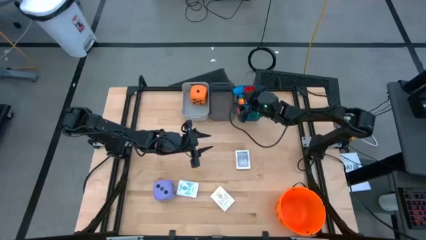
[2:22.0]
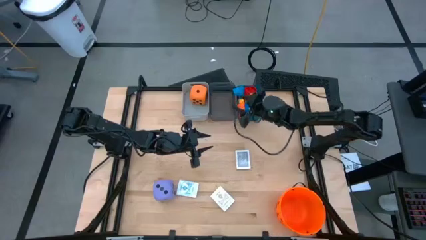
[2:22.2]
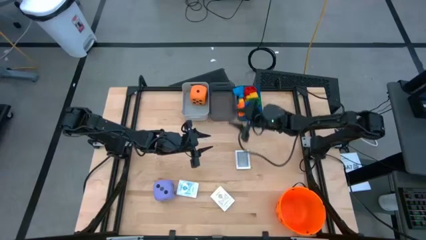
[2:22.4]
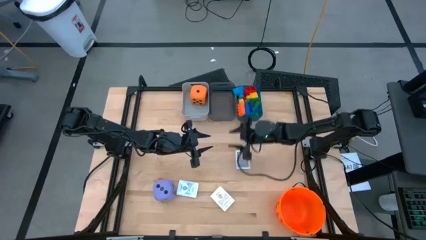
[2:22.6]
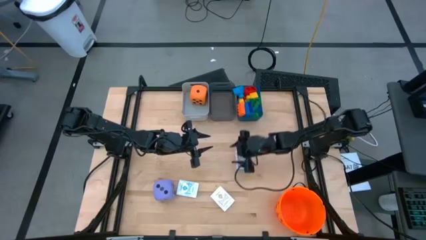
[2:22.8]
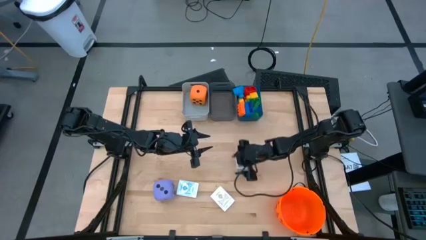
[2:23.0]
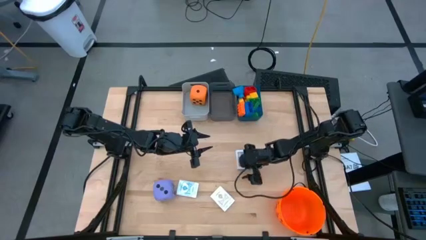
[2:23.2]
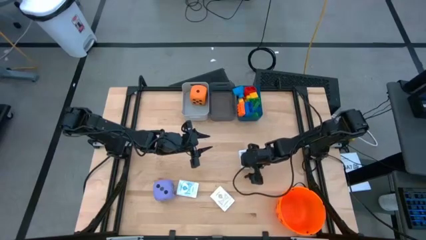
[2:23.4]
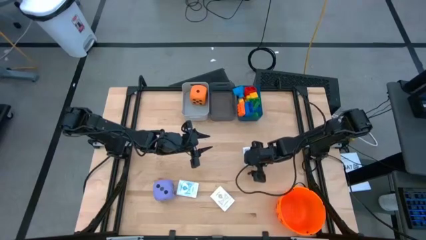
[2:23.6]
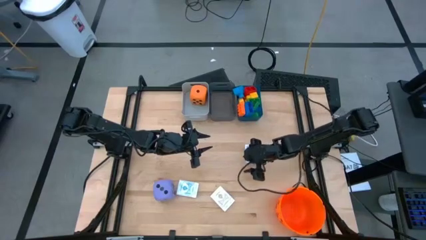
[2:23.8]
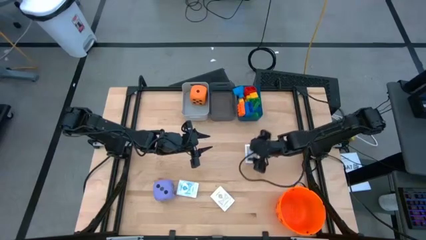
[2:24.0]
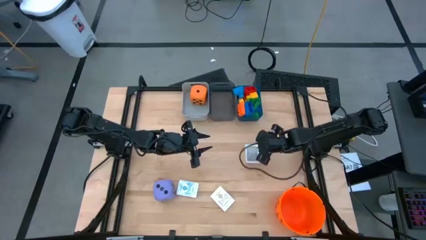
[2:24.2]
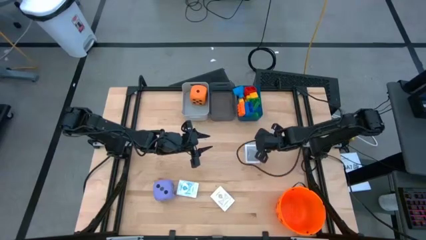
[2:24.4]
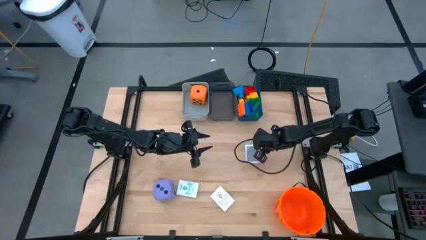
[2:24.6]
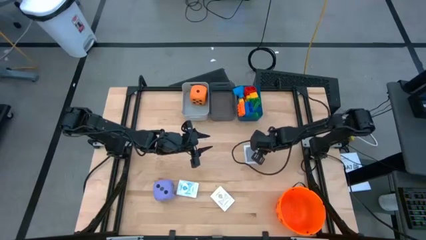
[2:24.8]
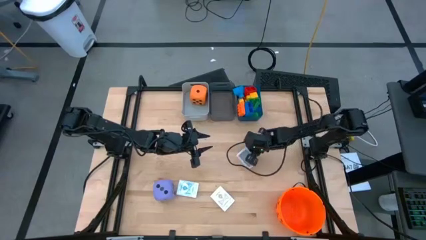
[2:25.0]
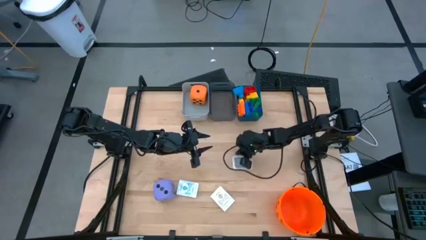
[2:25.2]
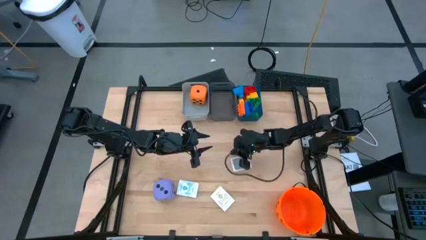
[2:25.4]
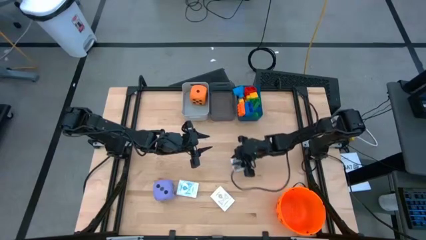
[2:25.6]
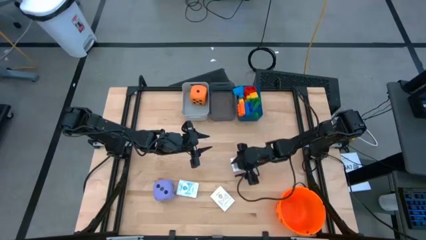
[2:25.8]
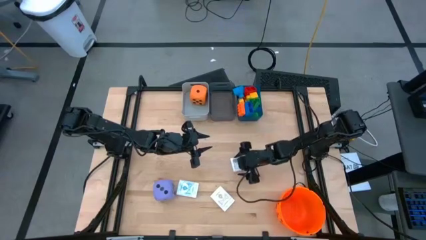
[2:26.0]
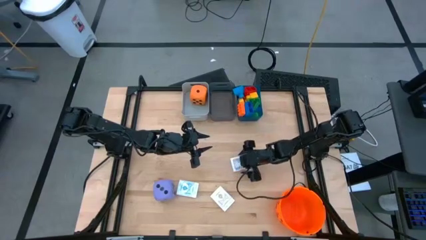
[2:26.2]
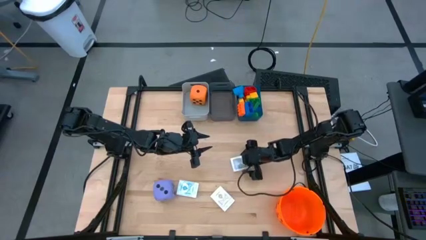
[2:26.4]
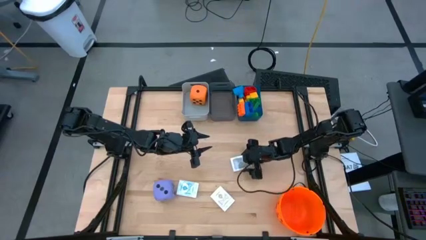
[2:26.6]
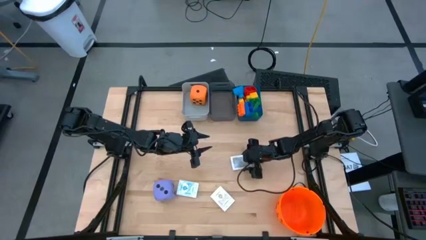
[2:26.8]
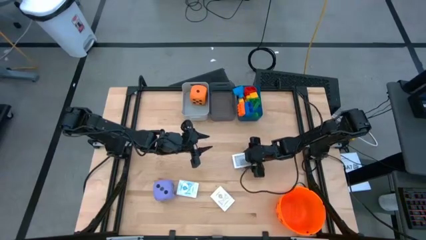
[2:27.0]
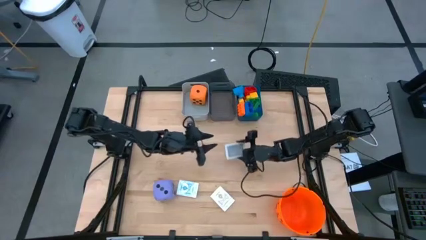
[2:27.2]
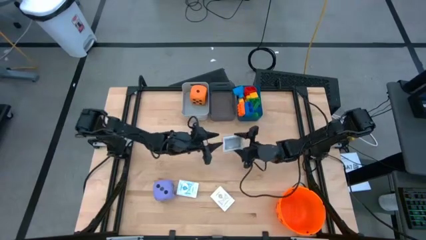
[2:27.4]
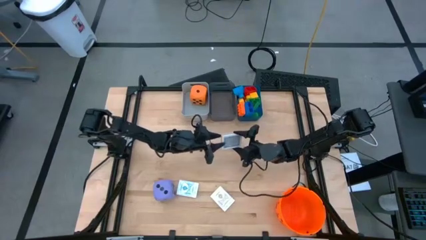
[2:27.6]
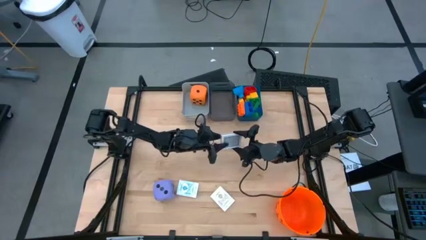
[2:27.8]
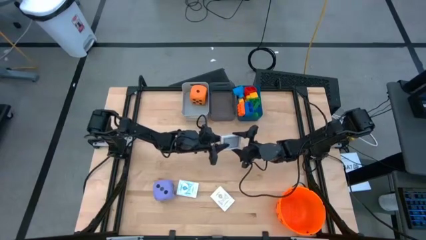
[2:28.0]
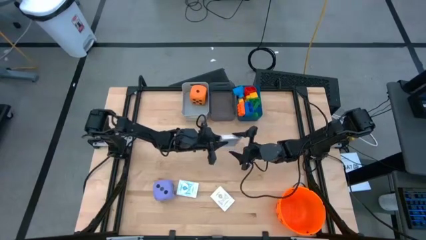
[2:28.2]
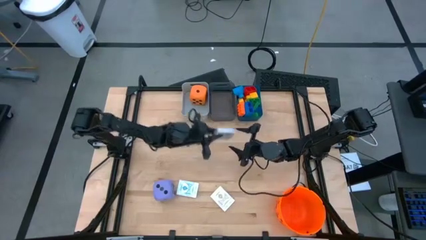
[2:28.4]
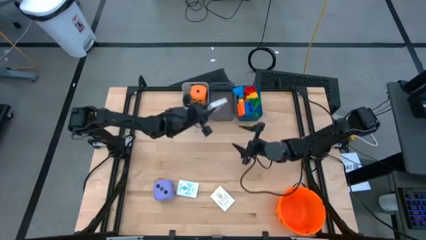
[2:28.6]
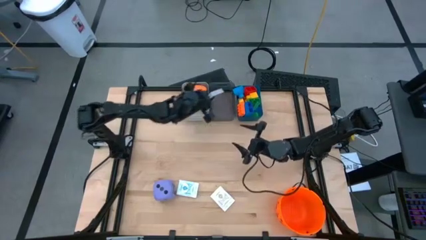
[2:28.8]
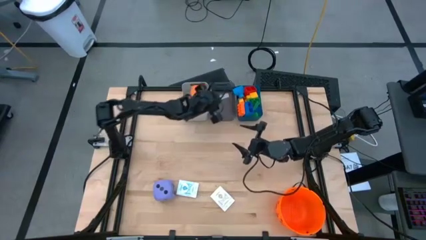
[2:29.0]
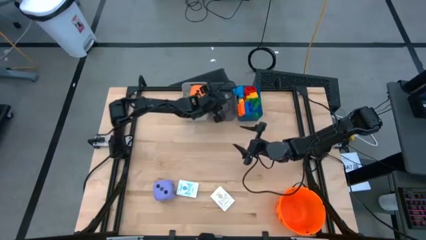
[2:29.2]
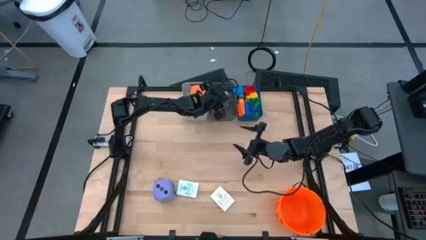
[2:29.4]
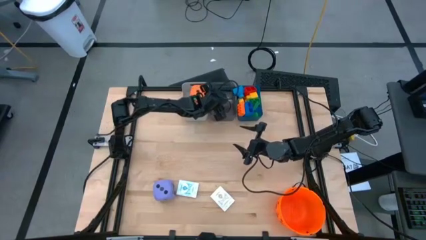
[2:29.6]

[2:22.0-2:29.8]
Task: Pick & Place Toys
Put the green playing cards into the black bin

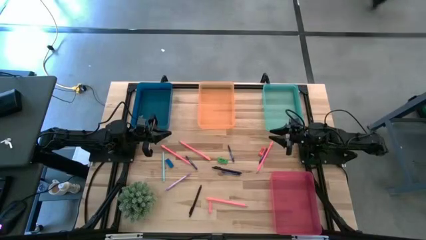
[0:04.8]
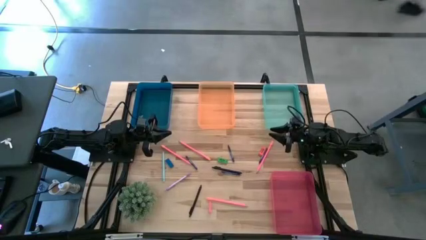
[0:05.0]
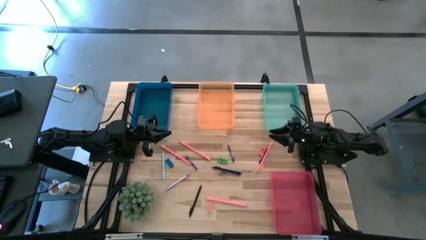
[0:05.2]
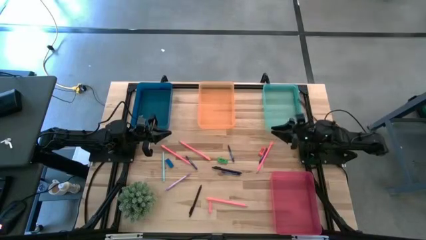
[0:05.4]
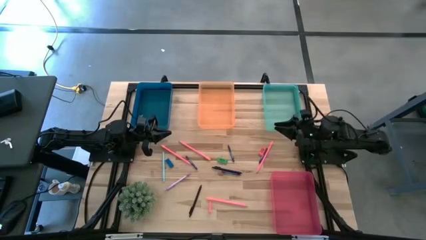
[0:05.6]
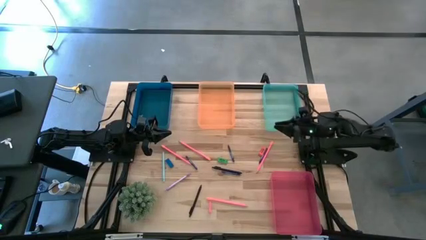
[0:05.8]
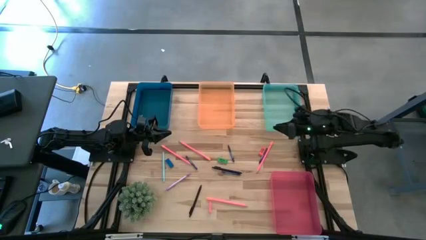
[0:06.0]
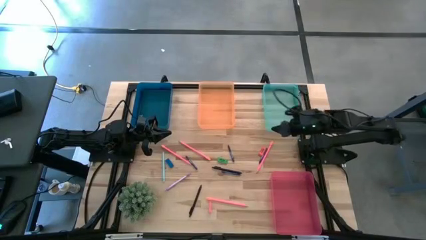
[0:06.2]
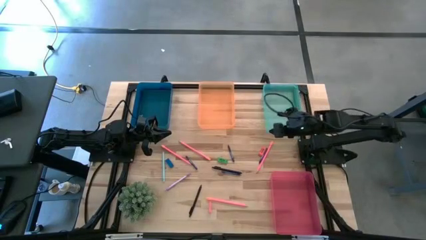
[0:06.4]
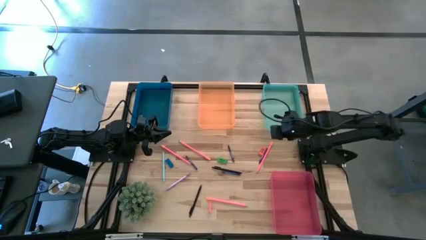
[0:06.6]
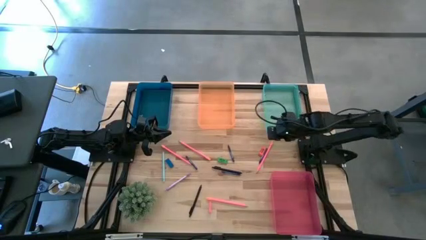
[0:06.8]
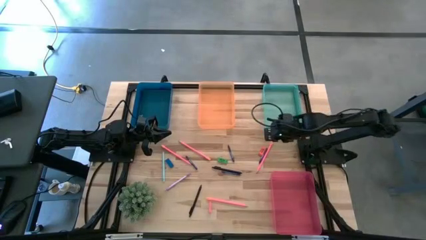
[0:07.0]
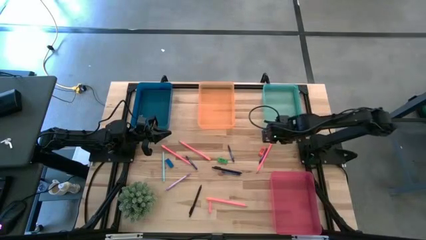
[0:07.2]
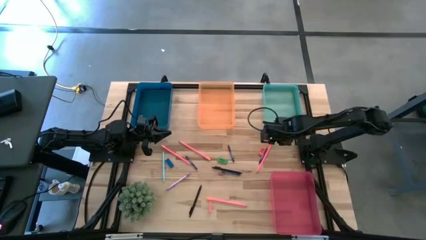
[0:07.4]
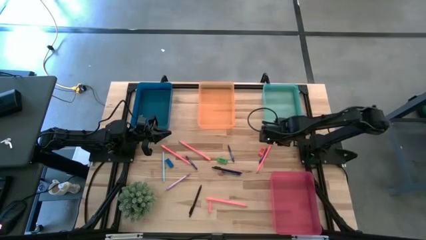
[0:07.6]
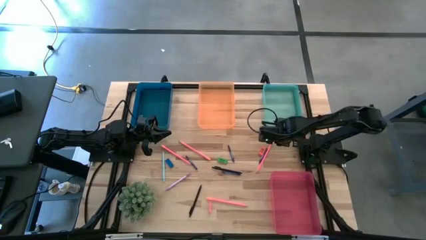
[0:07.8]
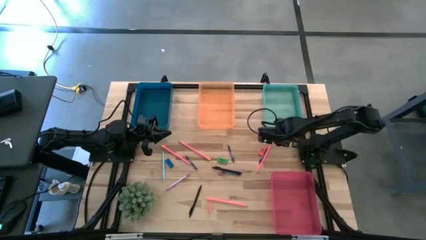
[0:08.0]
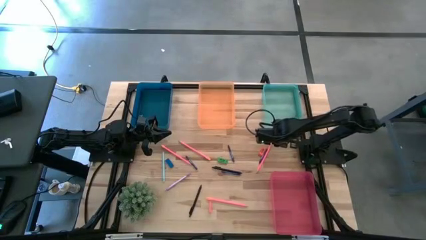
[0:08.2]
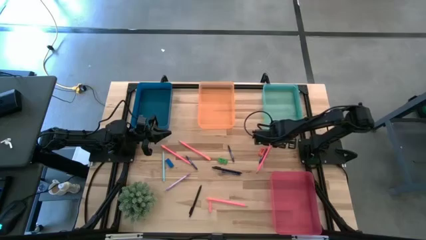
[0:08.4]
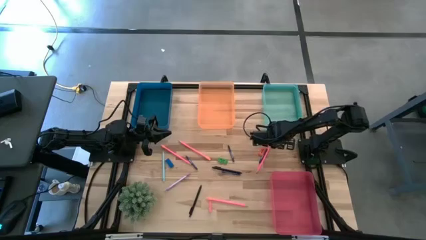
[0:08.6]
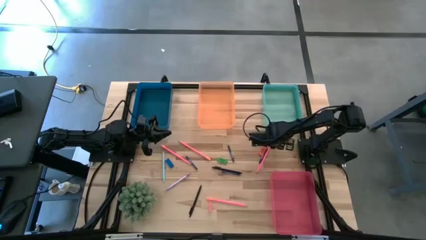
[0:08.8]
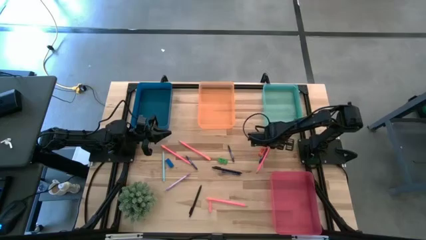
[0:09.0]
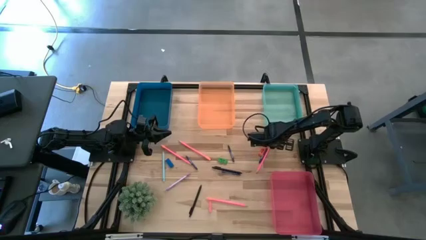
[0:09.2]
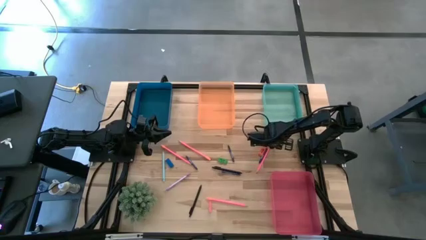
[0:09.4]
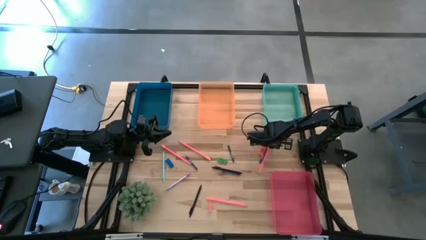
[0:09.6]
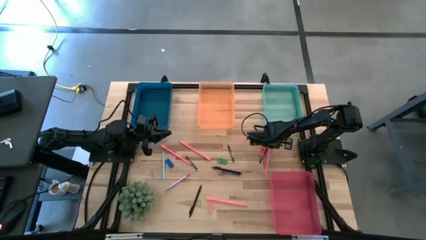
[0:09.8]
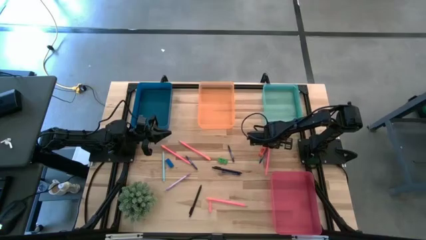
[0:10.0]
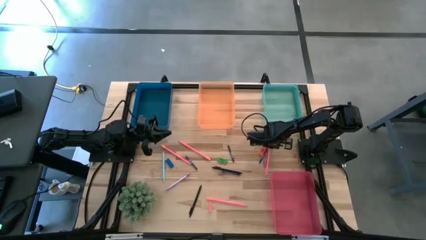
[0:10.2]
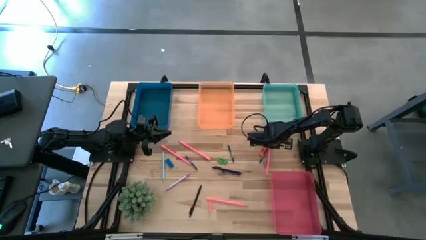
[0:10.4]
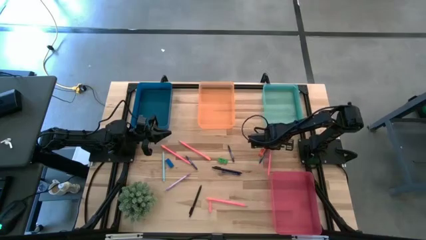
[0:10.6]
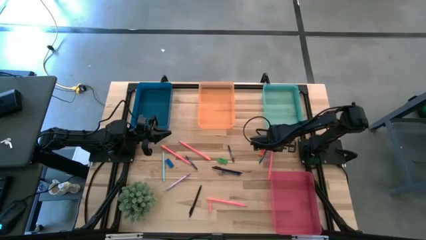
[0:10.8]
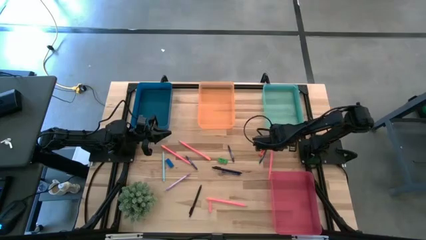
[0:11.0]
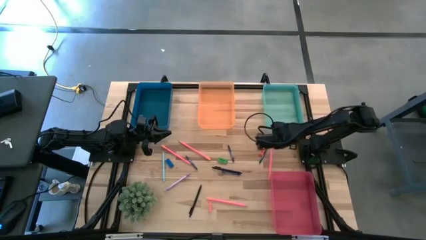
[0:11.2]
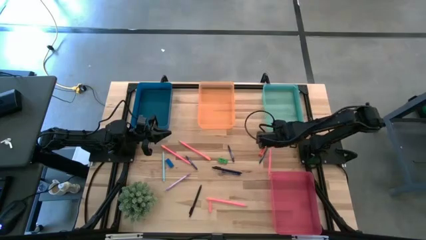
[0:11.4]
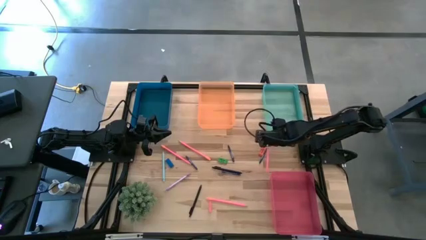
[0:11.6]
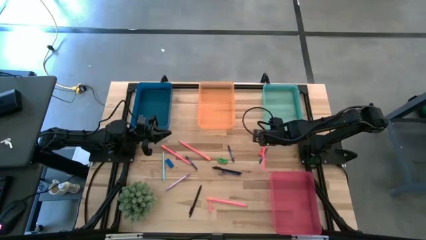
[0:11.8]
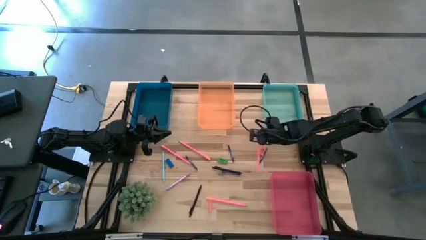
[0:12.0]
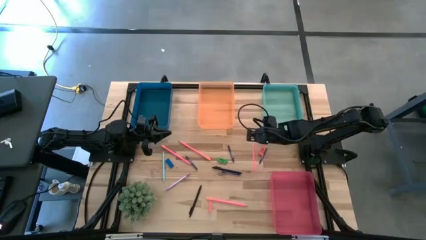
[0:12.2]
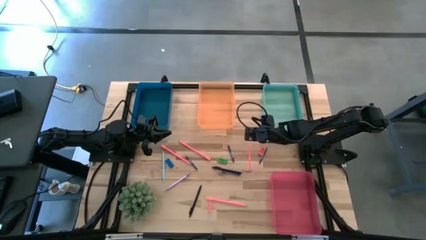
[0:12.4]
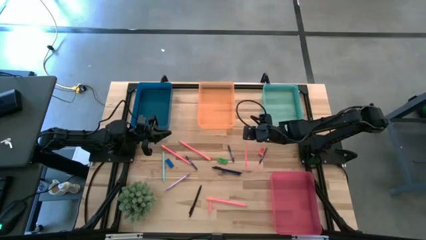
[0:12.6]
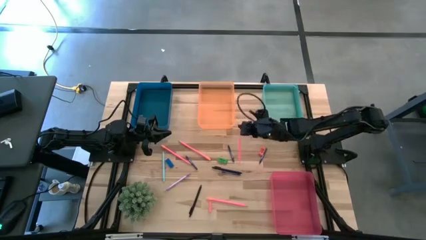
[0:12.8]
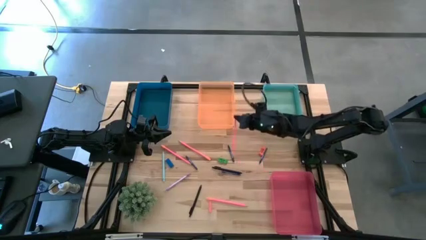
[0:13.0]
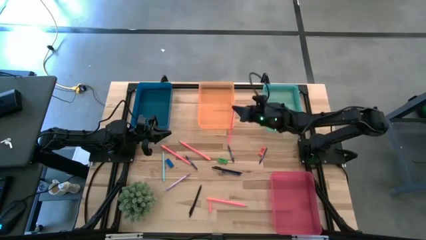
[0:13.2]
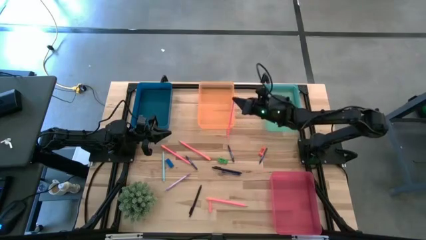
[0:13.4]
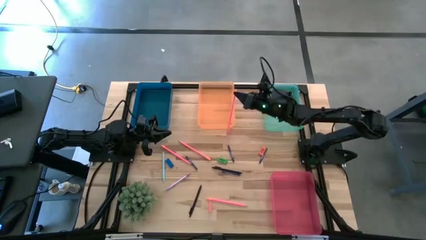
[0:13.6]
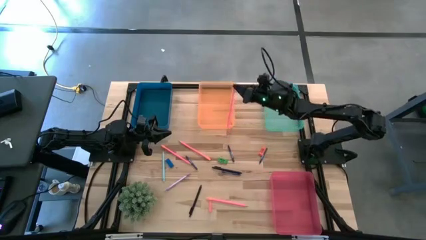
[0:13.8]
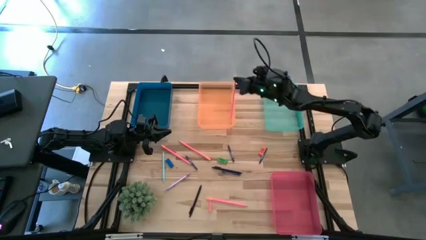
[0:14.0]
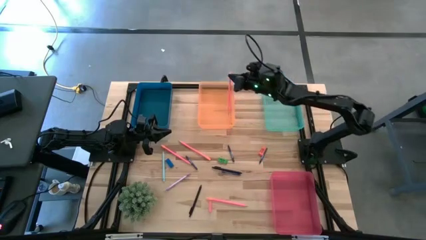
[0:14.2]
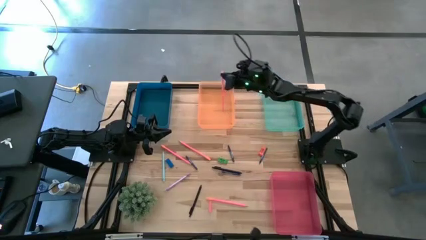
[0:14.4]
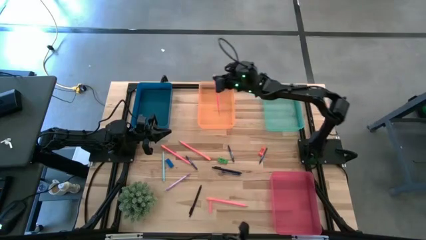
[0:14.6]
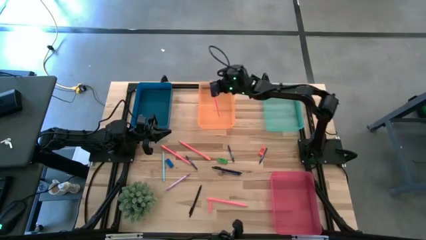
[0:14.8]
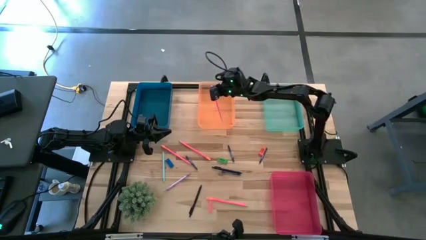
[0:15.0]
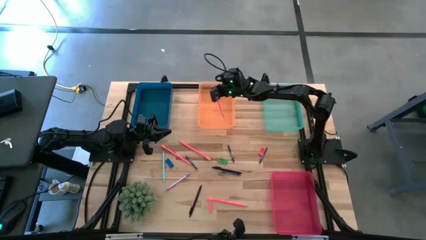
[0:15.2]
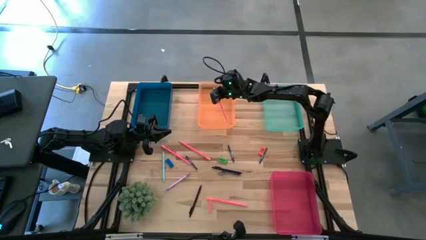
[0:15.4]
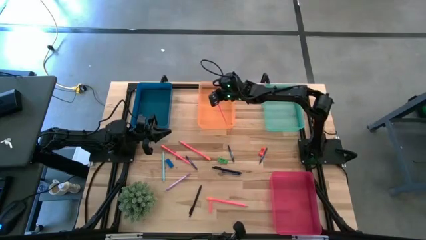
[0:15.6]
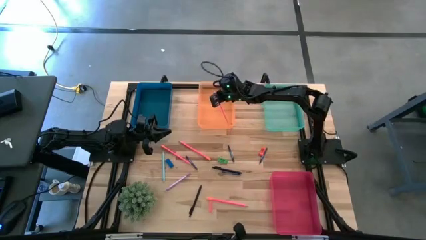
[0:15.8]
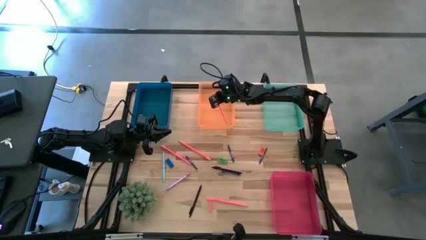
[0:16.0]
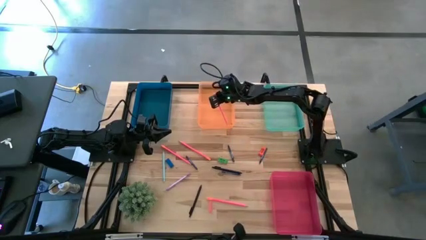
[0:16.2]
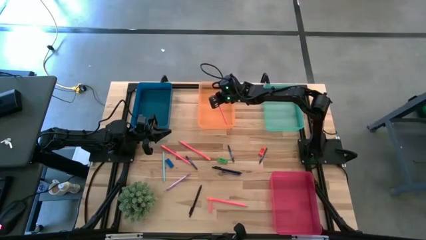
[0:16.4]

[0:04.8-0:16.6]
Task: Sort crayons/erasers/pens/pencils in bins
Put the pink pencil into the orange bin
